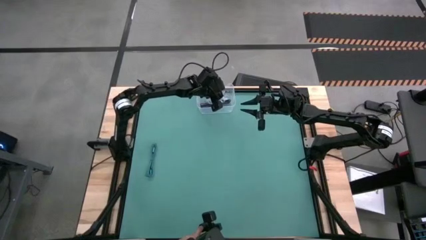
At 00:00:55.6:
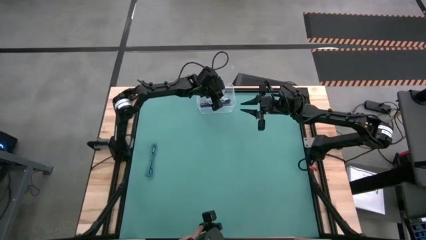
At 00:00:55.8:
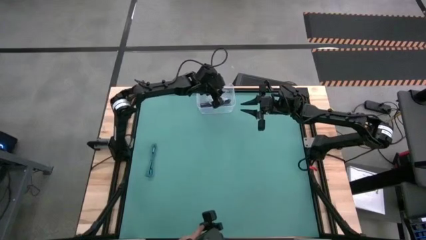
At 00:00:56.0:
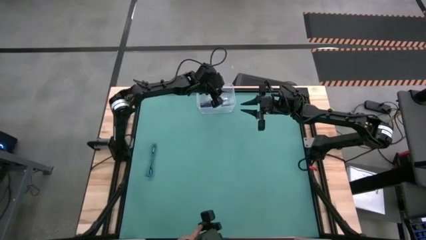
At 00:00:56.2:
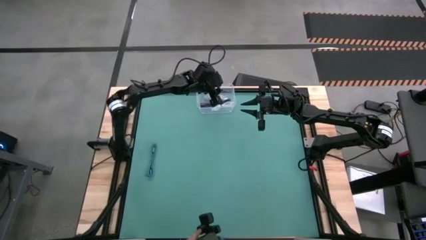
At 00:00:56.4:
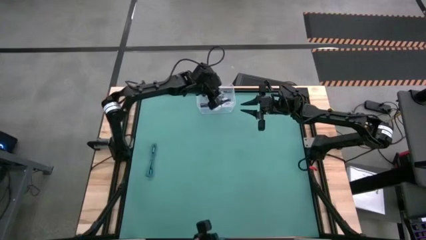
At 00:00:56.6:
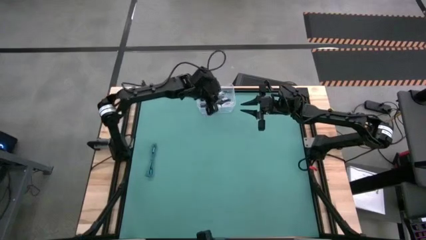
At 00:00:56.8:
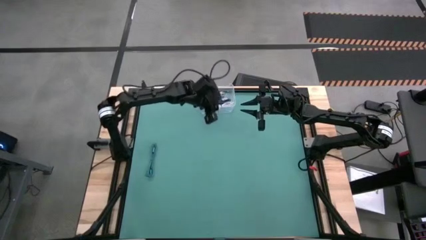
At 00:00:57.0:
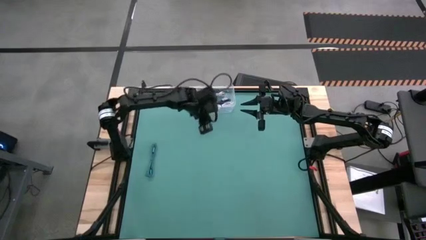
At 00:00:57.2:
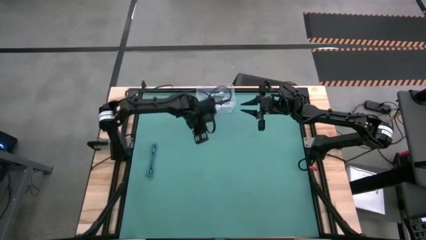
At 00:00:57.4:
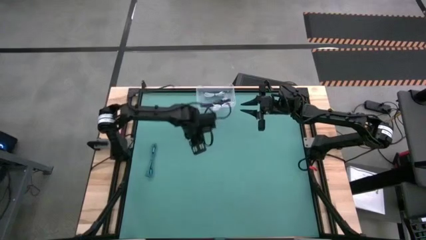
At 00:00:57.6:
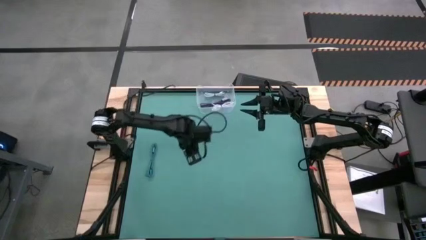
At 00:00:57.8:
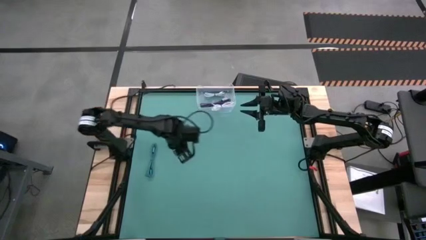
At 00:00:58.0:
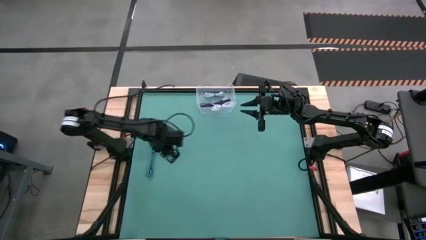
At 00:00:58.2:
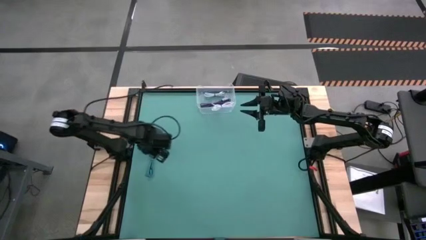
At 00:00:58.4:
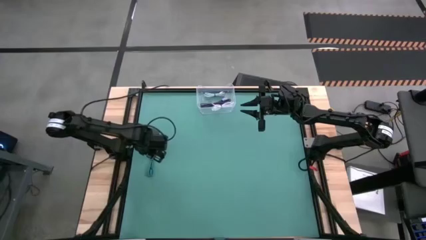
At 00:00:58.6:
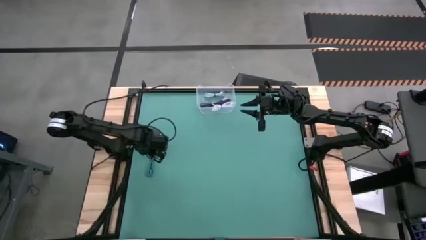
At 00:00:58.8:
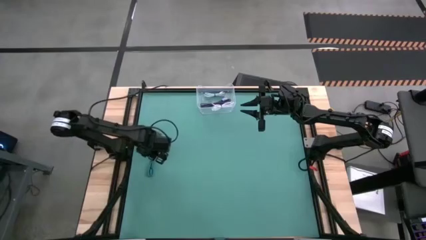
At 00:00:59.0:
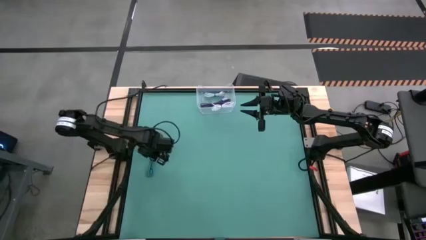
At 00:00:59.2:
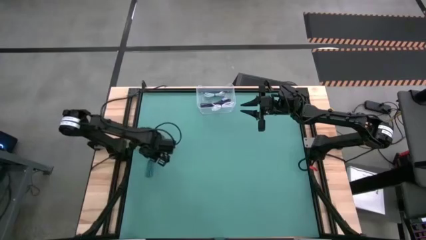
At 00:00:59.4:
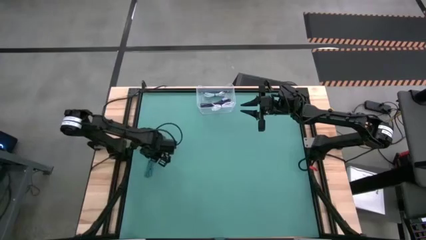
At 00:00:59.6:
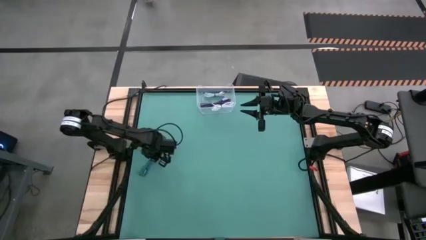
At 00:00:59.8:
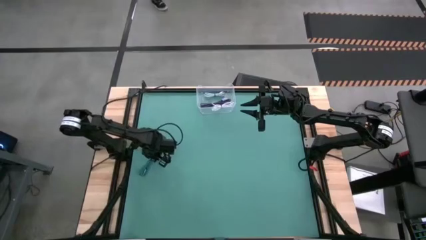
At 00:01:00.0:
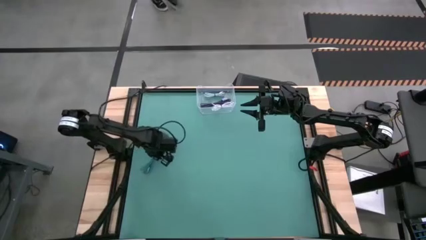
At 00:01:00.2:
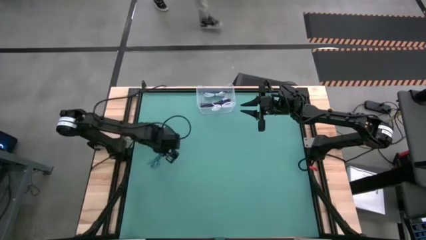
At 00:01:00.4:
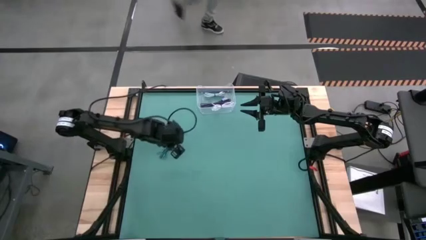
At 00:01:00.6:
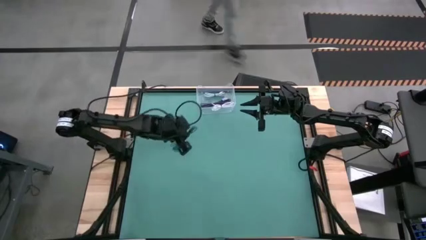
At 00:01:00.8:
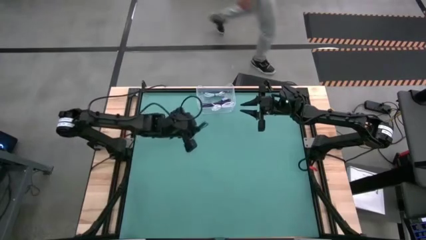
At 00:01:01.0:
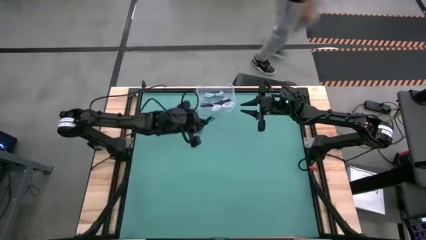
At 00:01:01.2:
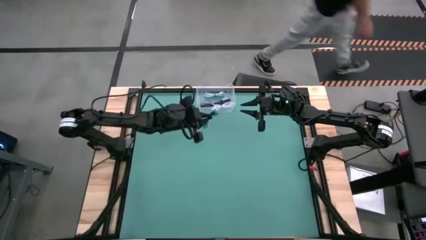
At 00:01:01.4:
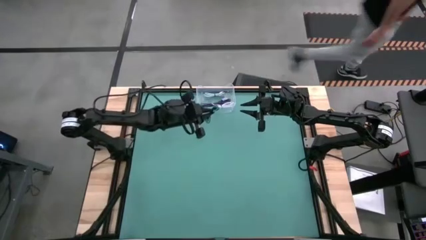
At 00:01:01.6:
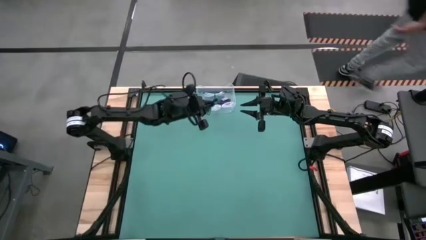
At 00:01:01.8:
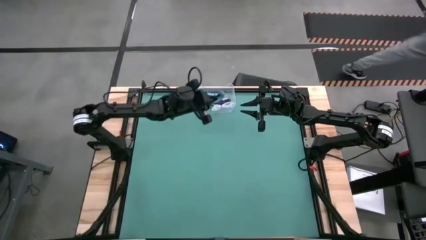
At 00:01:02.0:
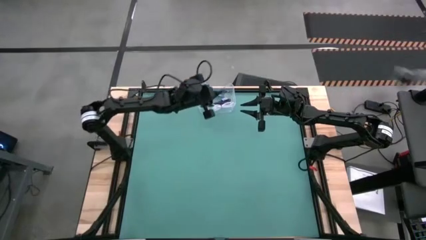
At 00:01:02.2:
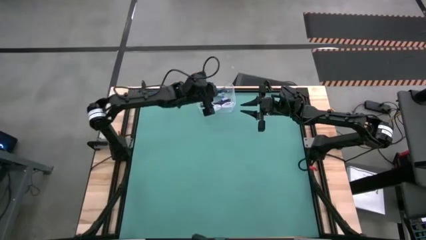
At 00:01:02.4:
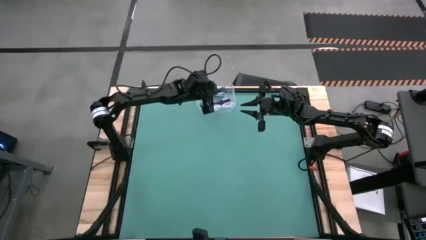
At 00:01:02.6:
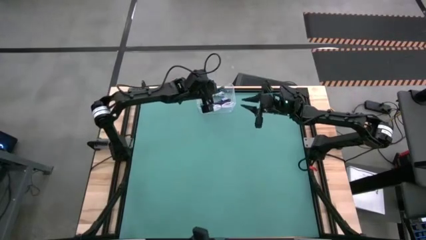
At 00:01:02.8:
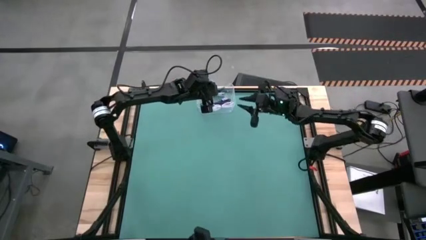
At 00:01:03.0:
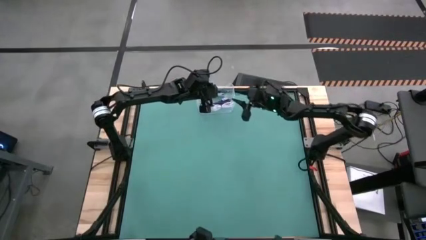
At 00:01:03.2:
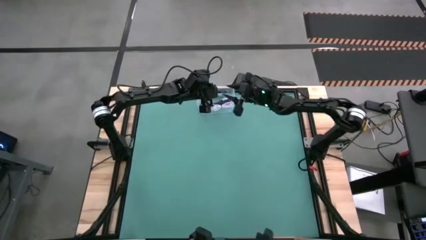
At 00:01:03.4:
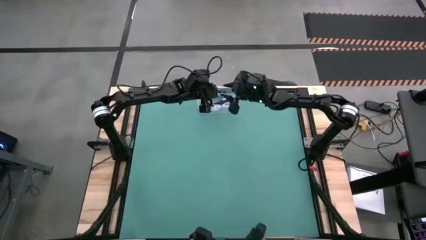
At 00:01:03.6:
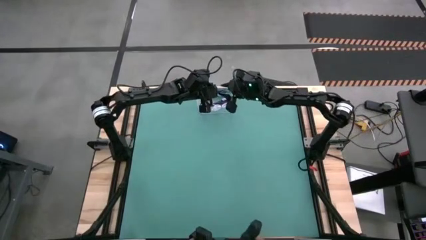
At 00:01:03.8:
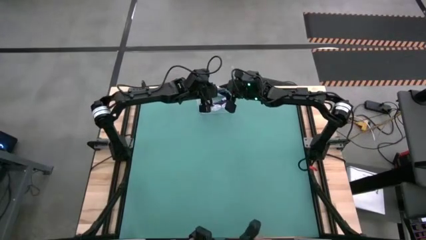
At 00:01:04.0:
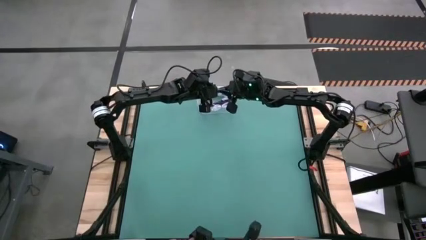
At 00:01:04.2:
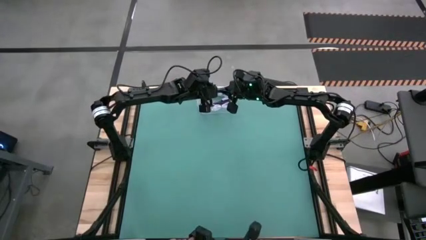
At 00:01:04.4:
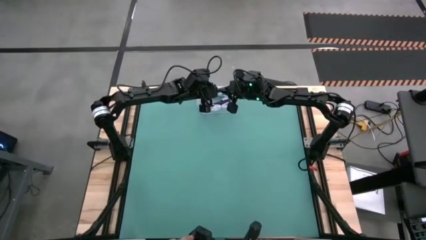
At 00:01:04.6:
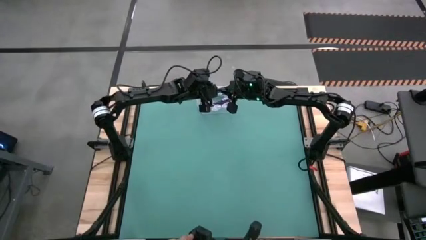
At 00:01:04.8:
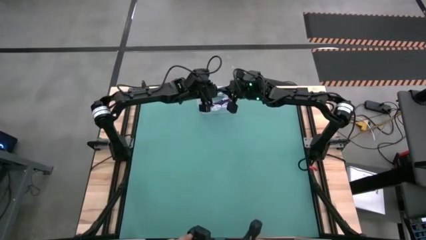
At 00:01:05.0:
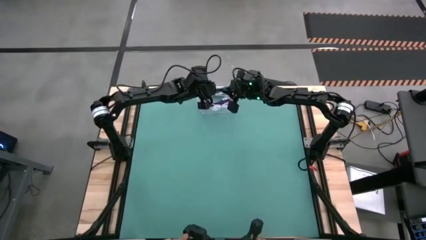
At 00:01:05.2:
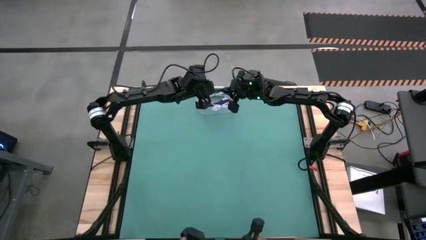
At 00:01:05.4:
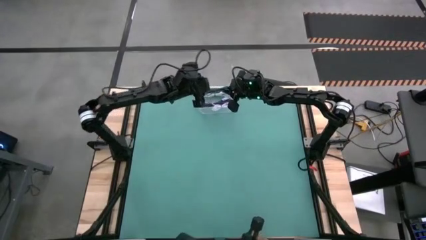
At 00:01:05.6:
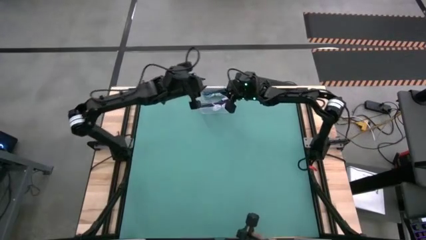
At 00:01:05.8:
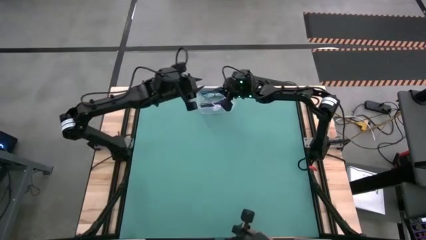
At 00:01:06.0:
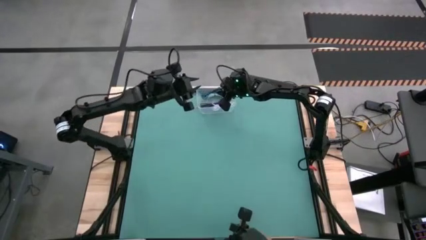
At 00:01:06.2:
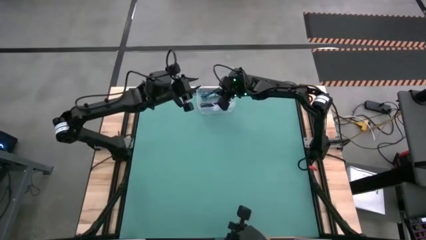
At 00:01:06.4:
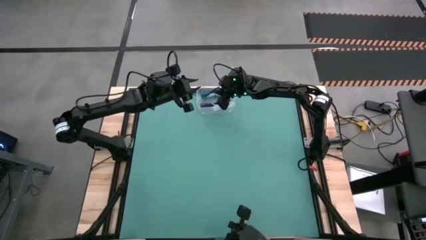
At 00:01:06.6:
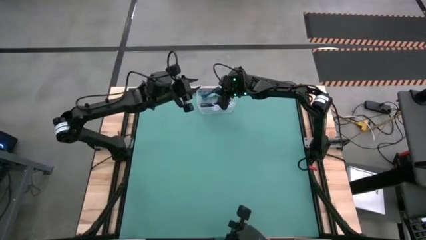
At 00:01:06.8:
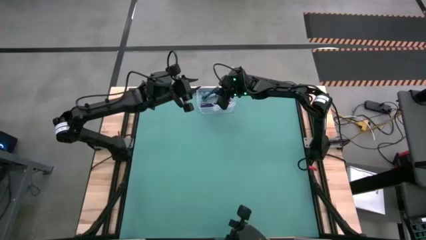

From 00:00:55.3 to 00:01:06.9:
Task: Pick and place USB-C Cables
Put the blue charger cable into the transparent bin
